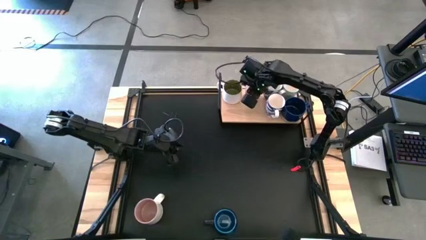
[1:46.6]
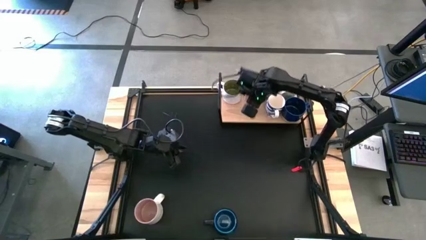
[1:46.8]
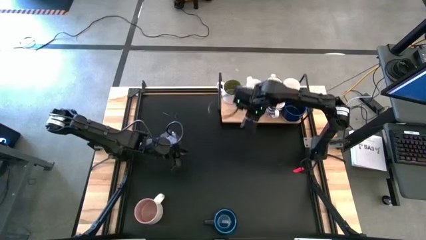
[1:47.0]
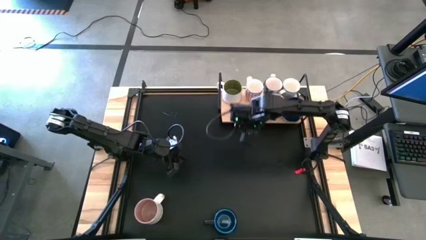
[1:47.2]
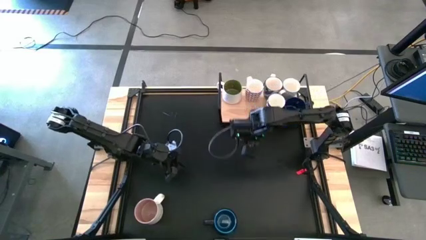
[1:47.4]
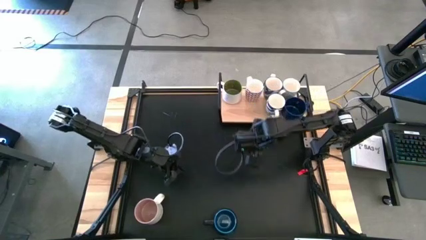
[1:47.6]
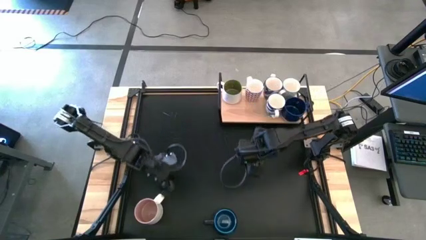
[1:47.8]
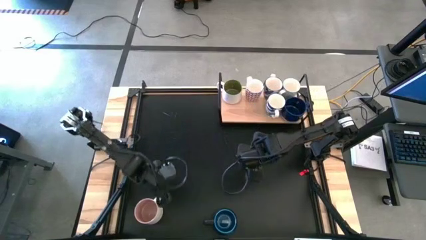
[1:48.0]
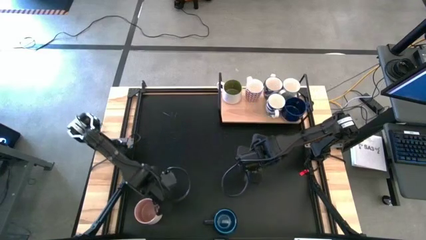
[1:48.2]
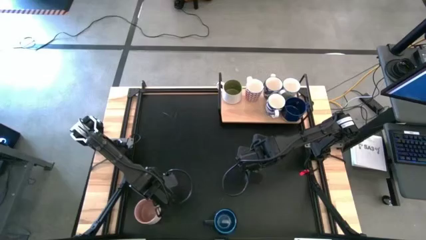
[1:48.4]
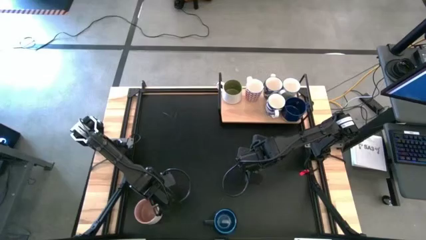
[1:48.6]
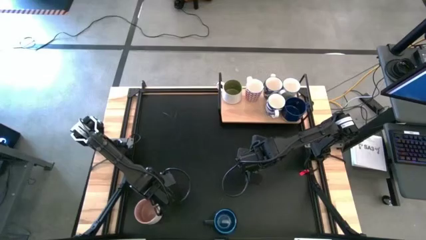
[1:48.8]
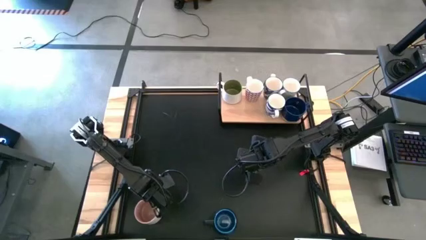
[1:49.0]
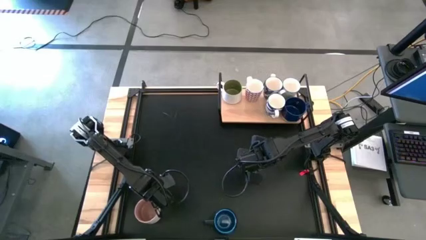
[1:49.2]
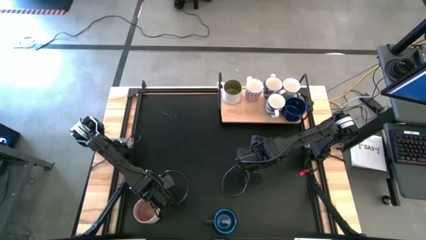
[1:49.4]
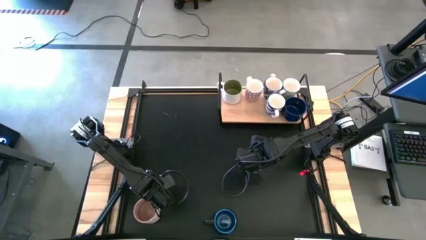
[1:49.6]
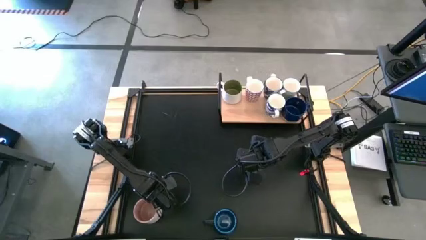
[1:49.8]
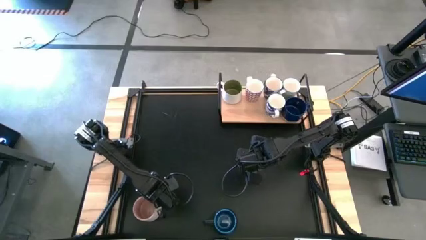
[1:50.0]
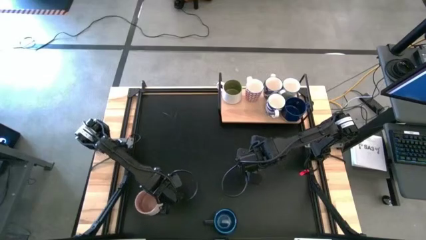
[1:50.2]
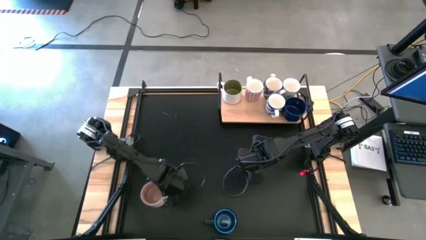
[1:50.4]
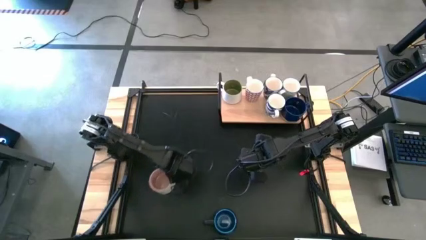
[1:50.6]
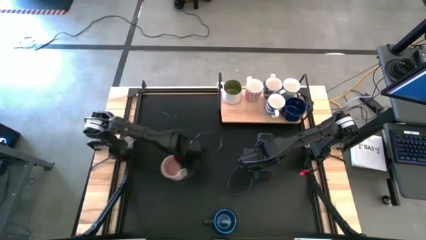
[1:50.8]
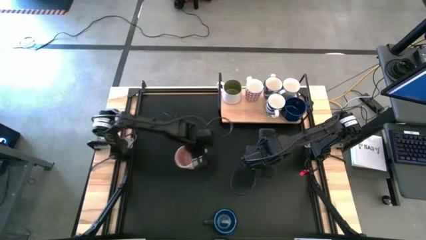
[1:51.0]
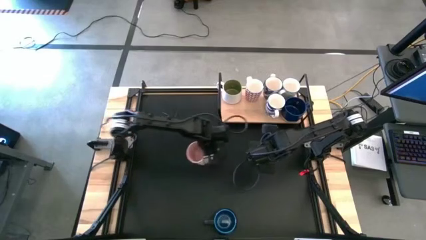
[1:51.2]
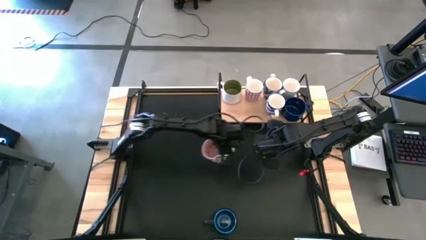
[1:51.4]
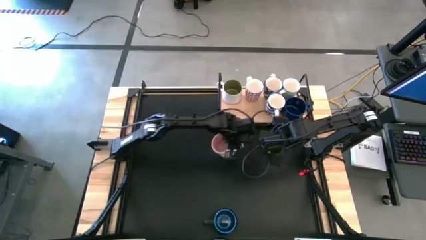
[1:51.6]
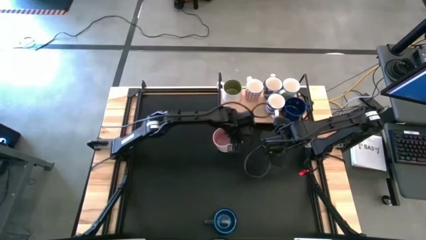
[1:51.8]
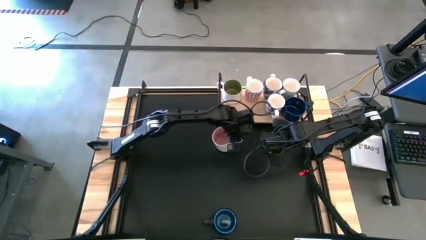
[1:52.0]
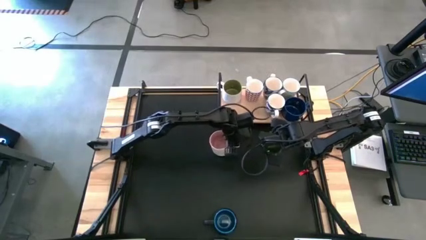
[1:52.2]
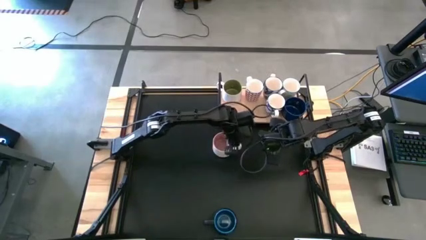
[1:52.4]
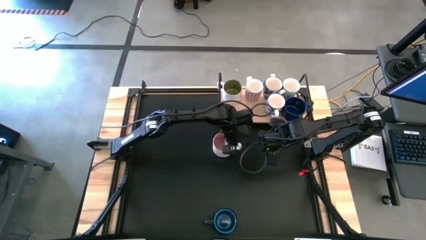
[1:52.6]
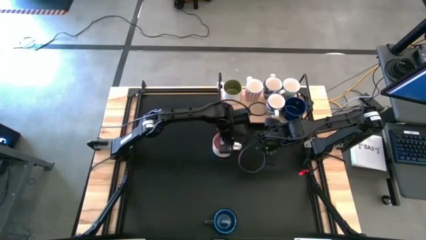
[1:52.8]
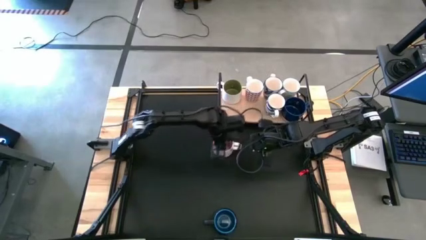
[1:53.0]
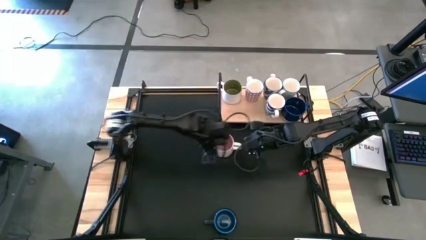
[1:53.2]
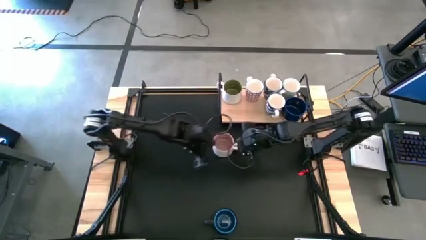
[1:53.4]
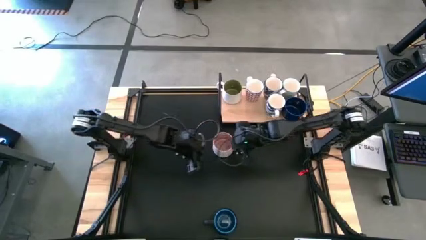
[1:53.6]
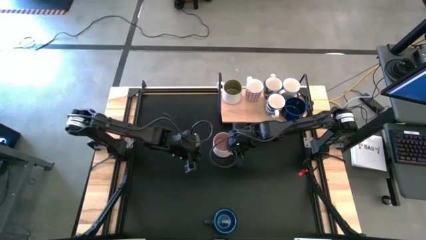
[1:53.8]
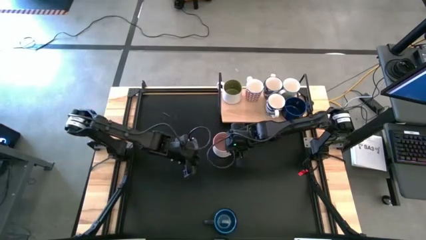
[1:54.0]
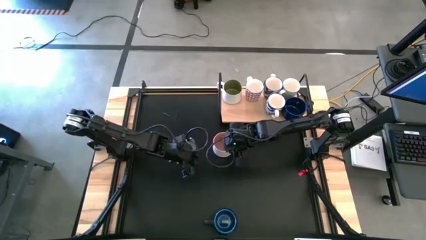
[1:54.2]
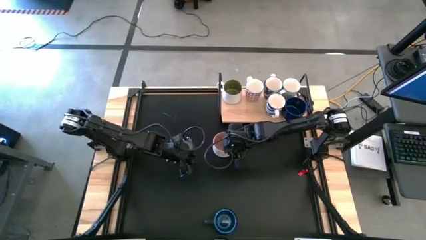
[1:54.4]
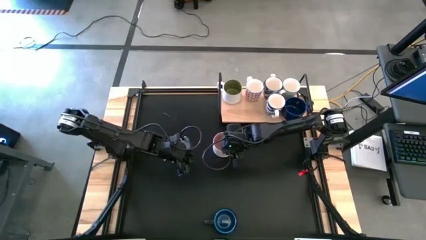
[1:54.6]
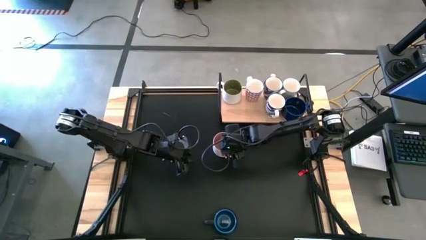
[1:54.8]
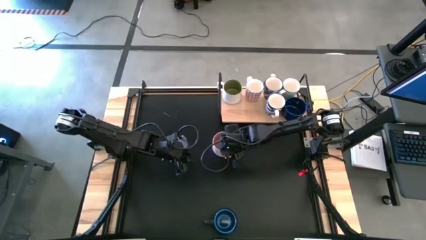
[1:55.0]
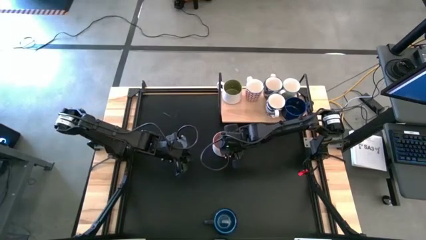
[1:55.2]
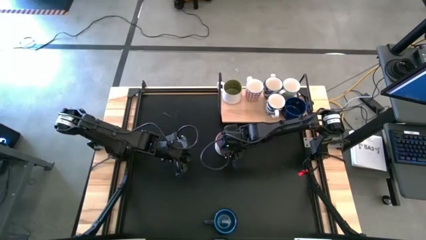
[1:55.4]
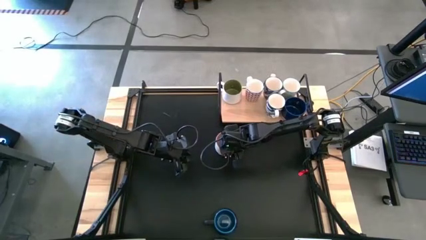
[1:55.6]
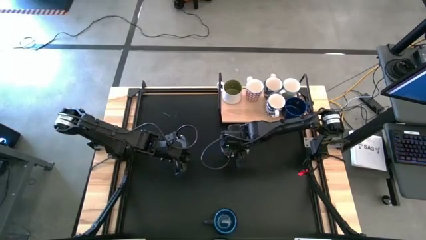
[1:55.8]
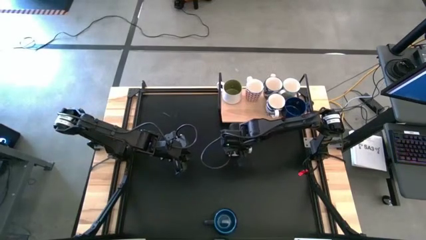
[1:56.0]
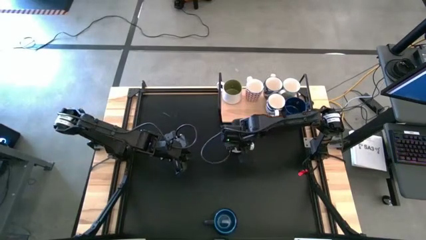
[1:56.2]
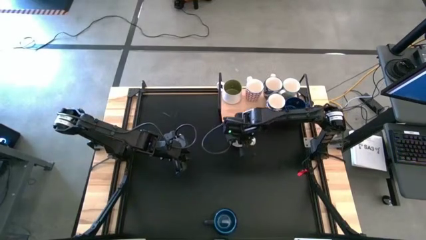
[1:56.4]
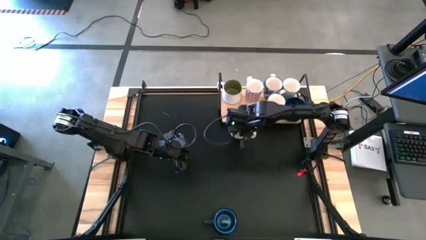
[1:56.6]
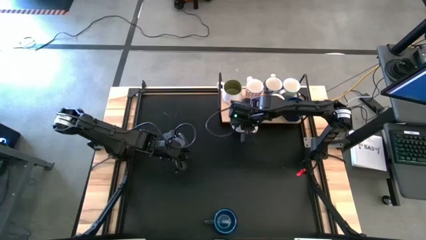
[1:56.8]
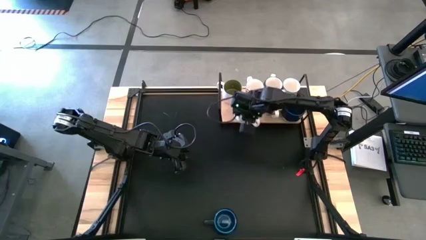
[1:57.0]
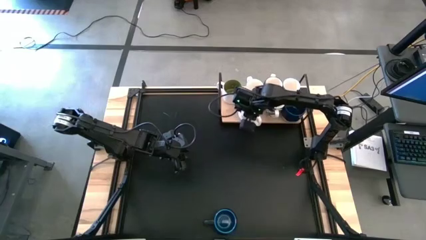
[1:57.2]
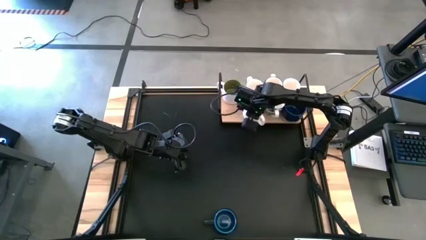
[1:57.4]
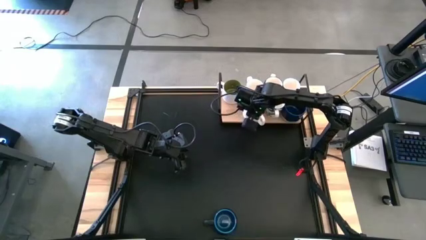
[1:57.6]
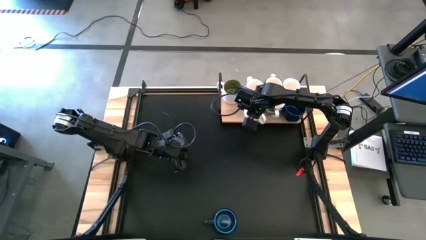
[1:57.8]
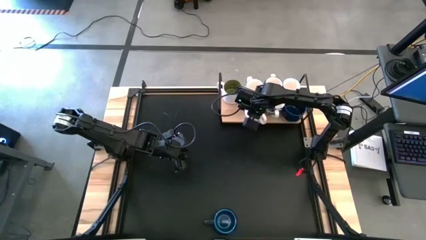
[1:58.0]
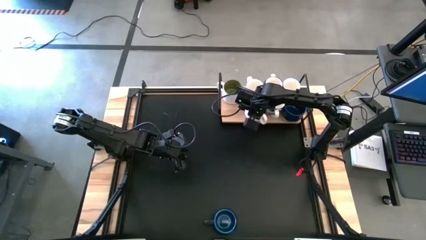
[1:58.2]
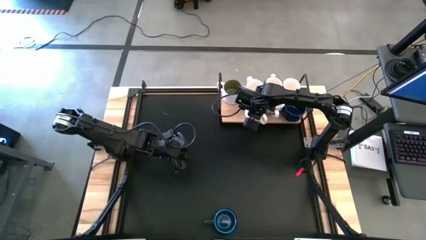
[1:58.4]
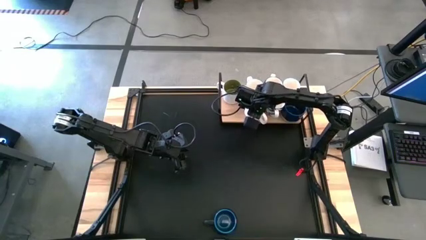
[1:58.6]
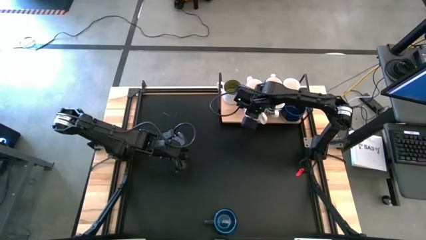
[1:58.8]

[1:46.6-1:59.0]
Task: Place coffee mugs
Put the pink mug on the shelf

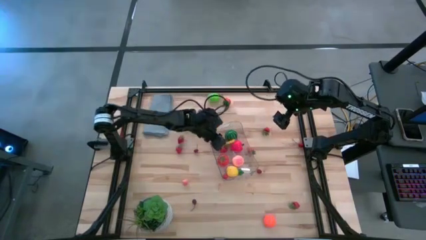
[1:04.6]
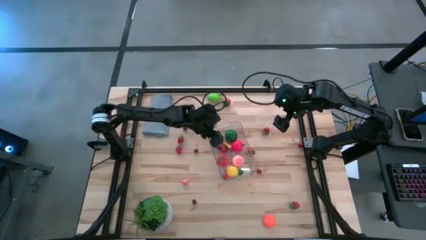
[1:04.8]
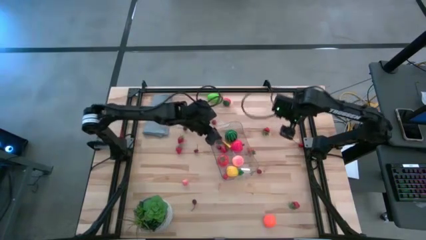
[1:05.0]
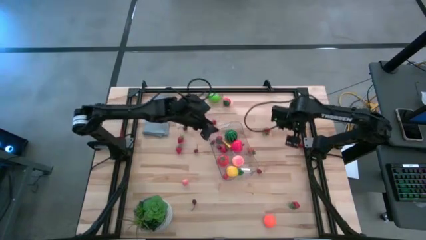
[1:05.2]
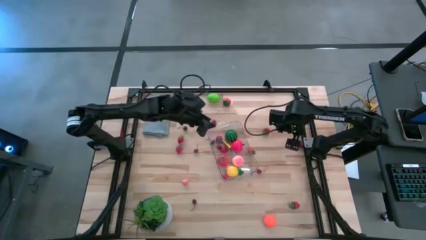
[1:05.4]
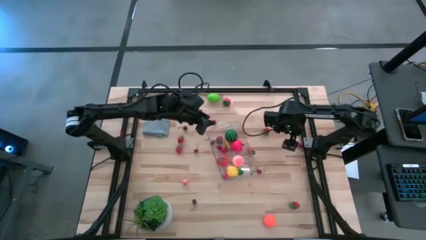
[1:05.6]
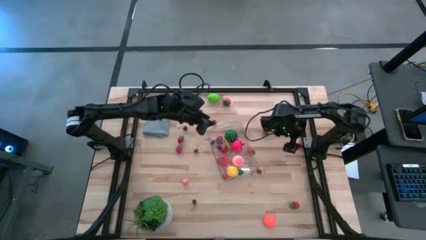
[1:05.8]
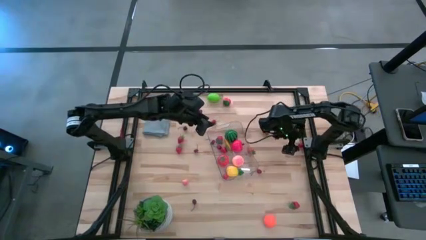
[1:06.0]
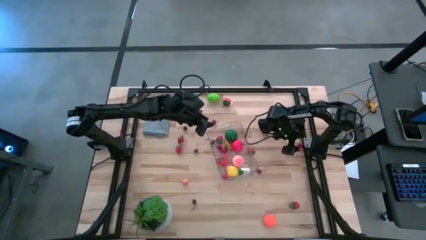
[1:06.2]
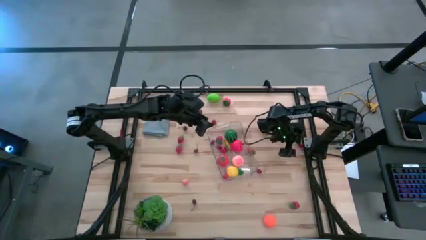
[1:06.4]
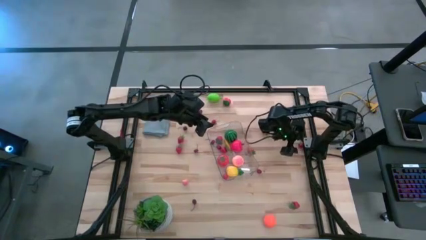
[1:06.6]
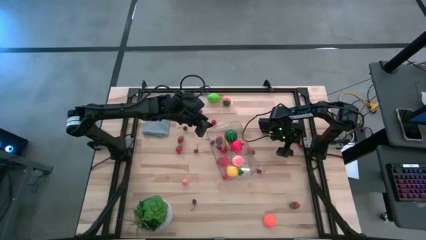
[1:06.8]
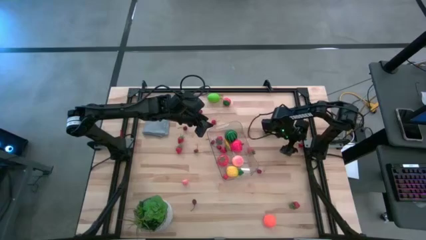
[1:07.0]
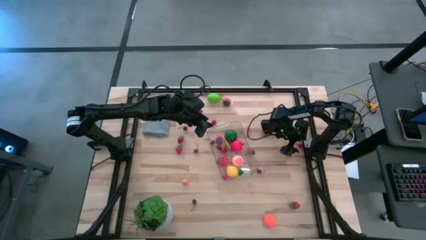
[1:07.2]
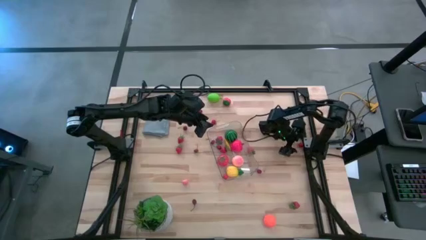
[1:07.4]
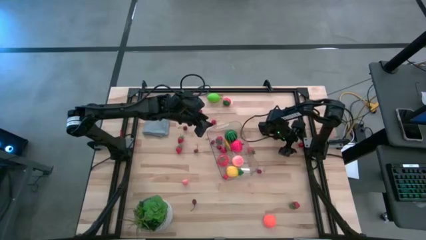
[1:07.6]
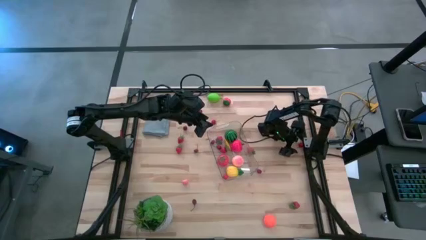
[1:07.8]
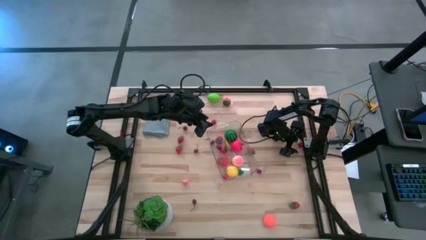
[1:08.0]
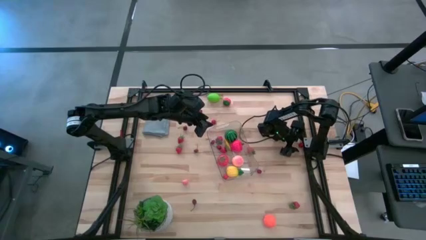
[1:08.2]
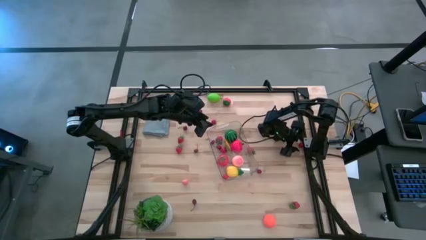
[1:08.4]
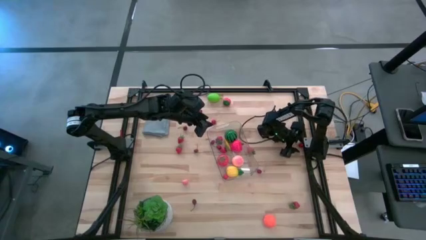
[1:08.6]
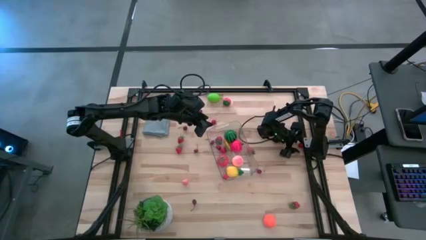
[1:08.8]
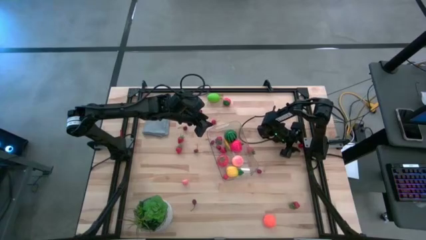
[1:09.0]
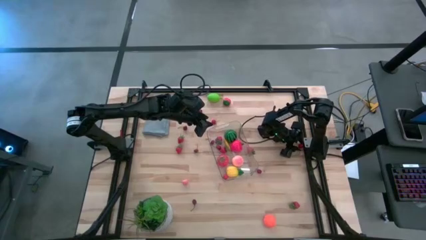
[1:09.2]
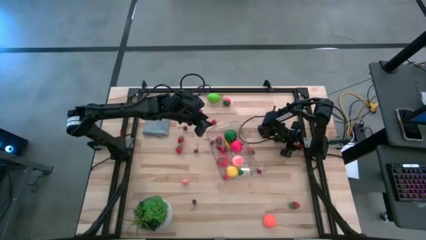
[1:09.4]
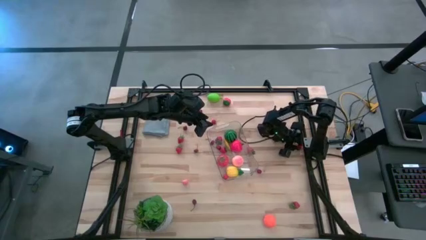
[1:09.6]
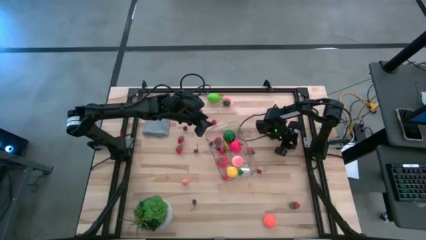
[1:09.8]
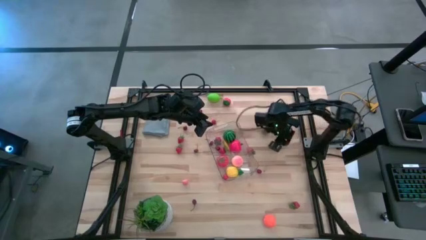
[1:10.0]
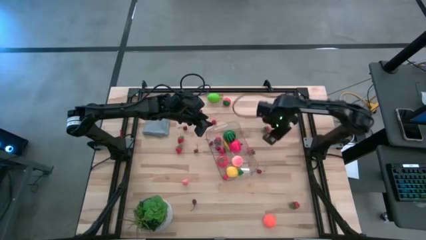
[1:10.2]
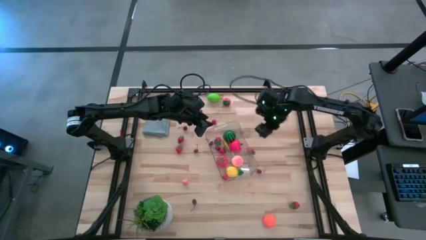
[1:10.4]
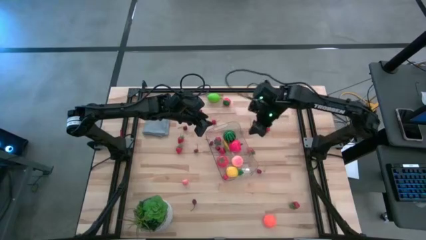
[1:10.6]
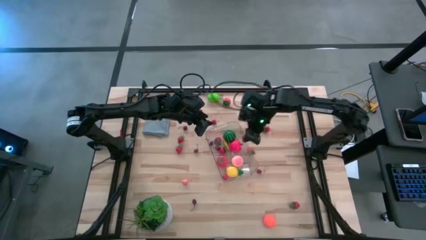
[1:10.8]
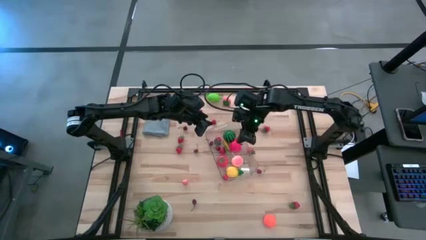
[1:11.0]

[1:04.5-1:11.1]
Task: Pick and placing Produce into tupperware
Put the red cherry into the transparent bin
